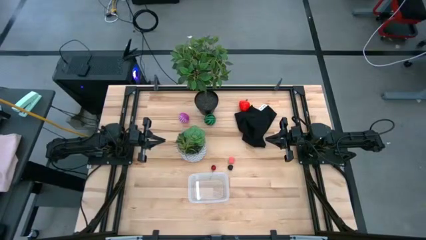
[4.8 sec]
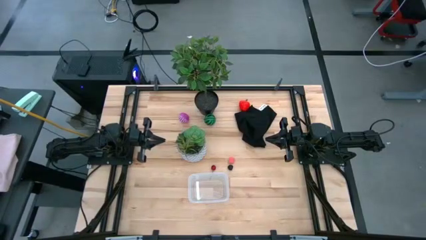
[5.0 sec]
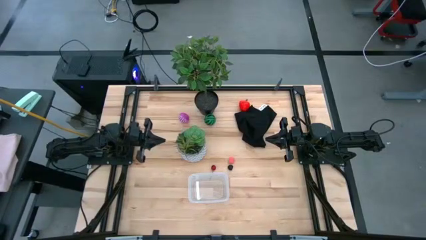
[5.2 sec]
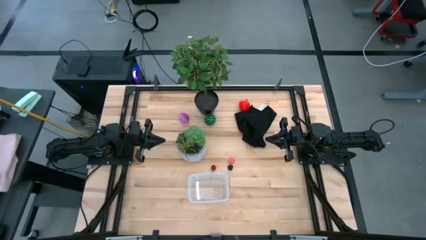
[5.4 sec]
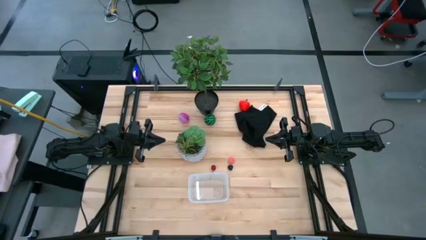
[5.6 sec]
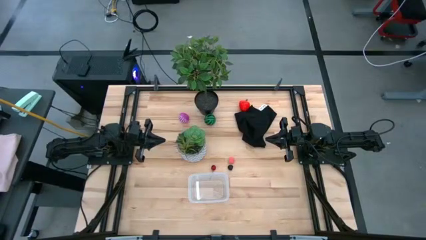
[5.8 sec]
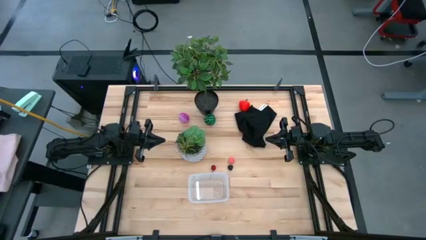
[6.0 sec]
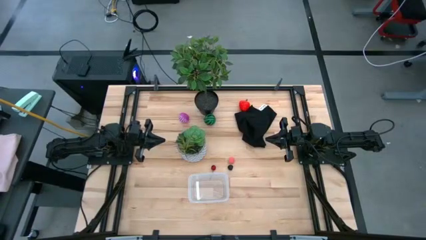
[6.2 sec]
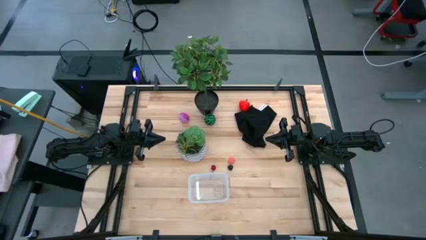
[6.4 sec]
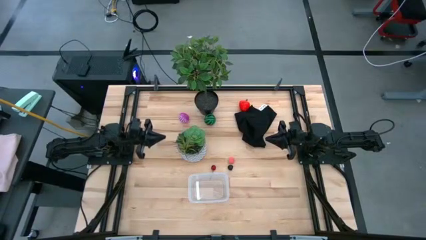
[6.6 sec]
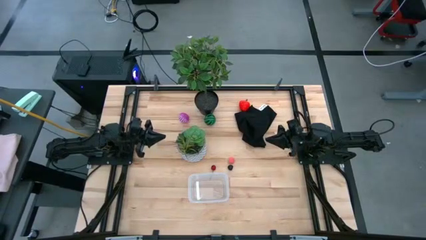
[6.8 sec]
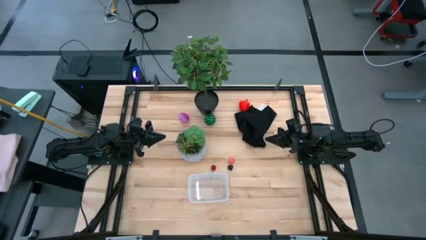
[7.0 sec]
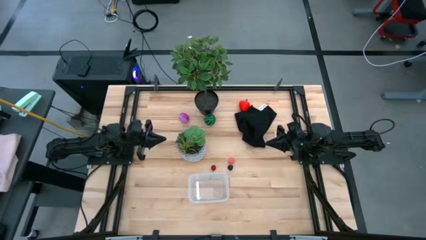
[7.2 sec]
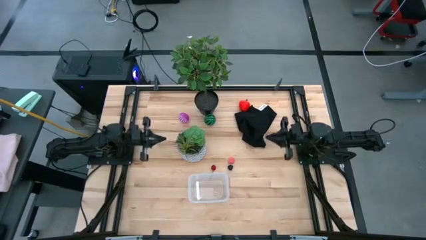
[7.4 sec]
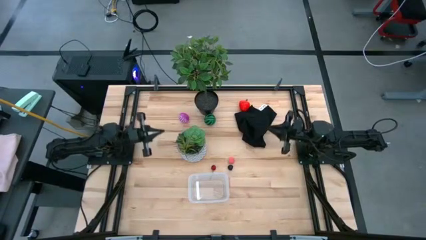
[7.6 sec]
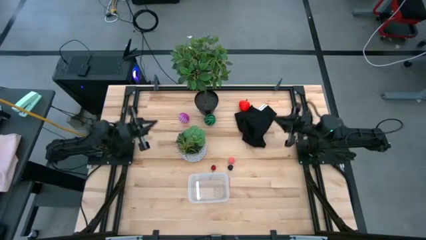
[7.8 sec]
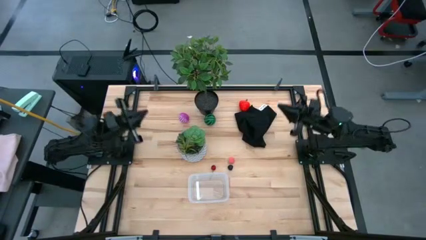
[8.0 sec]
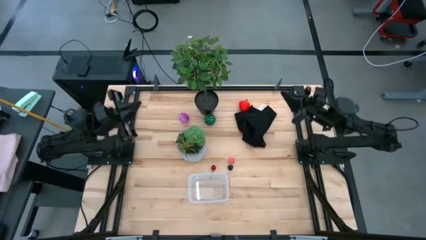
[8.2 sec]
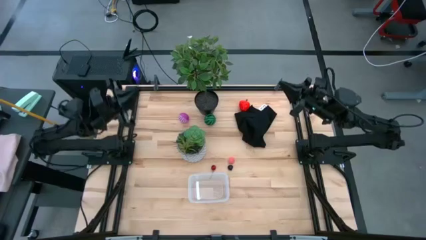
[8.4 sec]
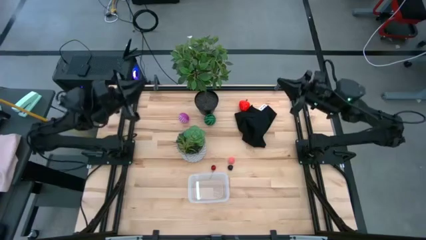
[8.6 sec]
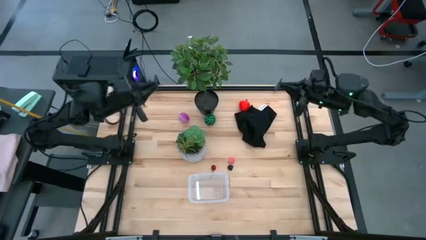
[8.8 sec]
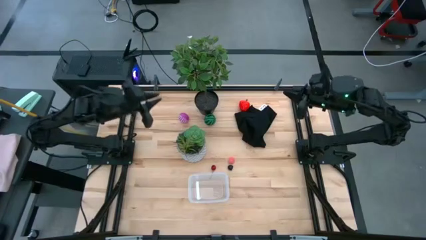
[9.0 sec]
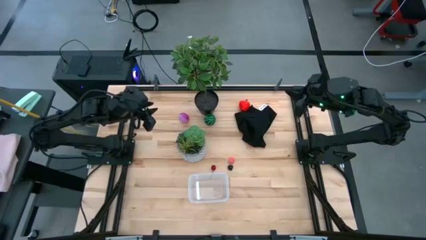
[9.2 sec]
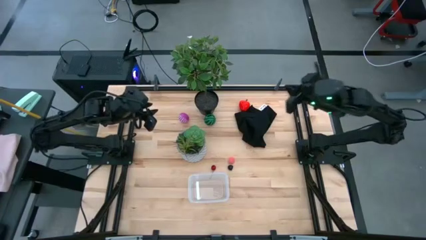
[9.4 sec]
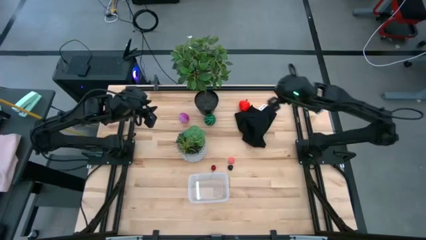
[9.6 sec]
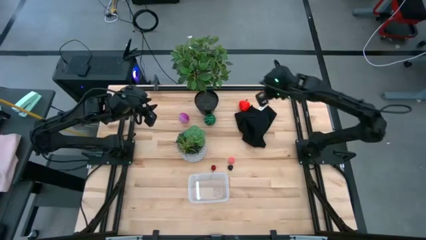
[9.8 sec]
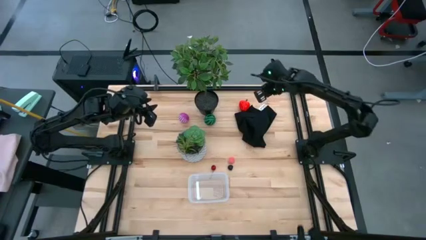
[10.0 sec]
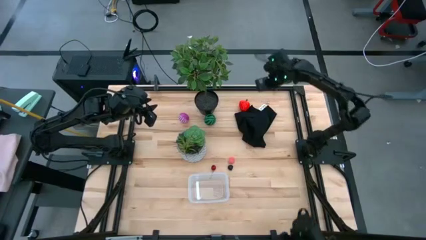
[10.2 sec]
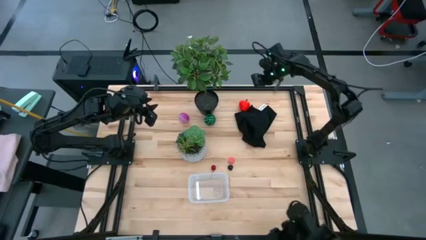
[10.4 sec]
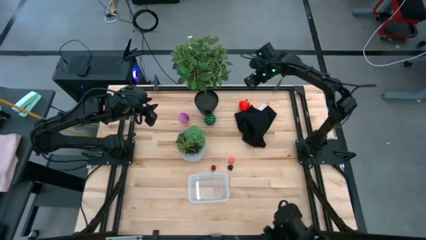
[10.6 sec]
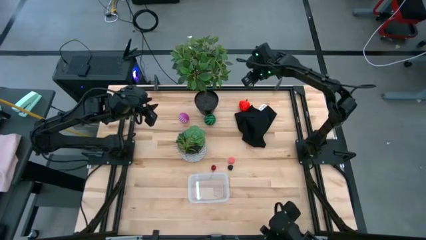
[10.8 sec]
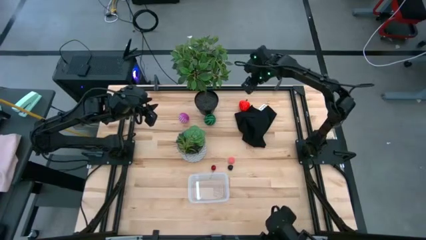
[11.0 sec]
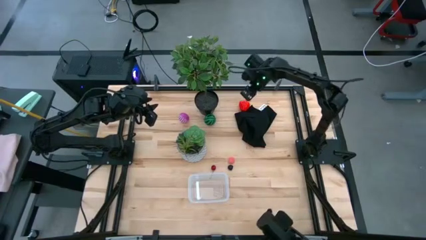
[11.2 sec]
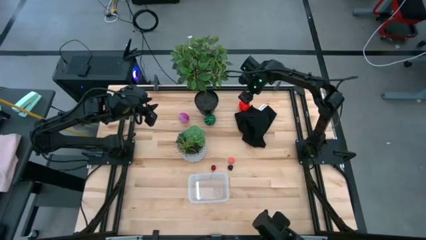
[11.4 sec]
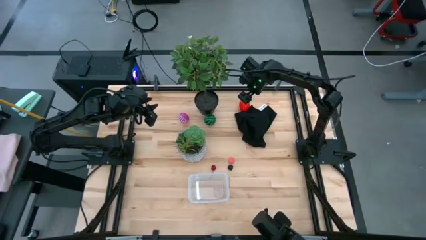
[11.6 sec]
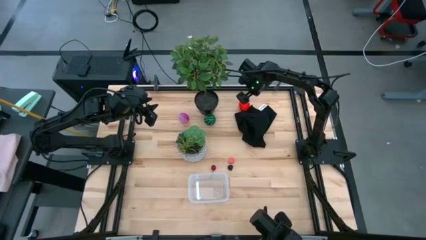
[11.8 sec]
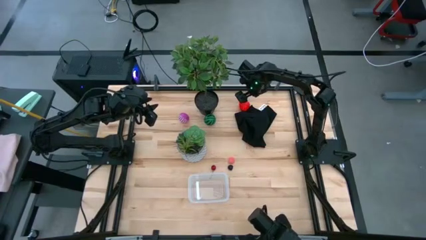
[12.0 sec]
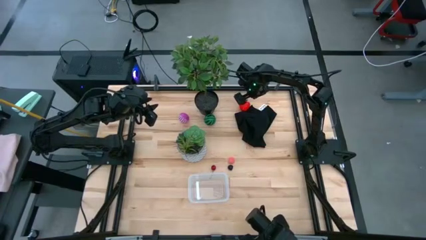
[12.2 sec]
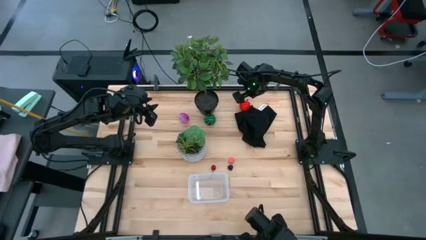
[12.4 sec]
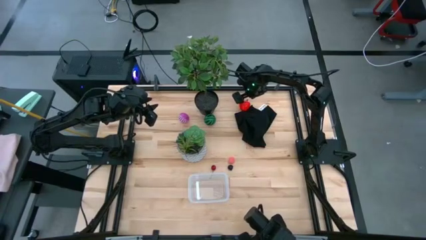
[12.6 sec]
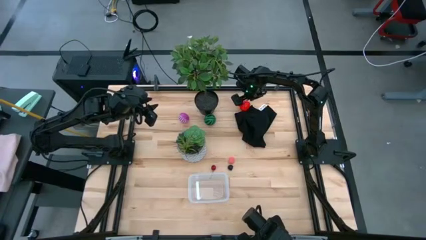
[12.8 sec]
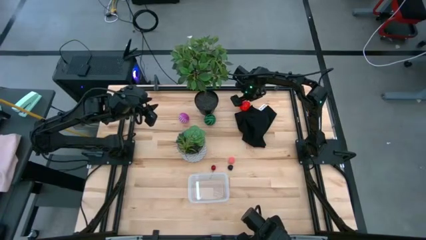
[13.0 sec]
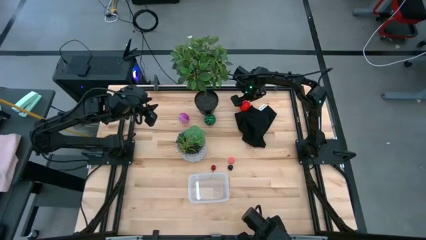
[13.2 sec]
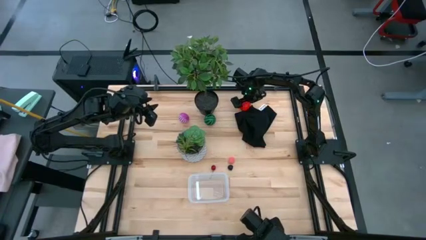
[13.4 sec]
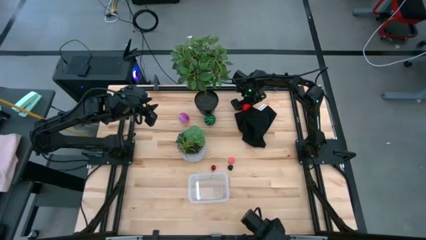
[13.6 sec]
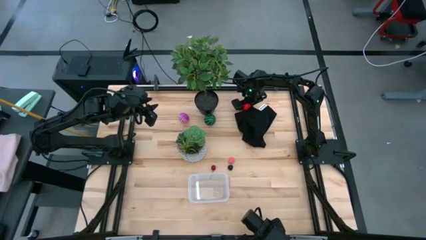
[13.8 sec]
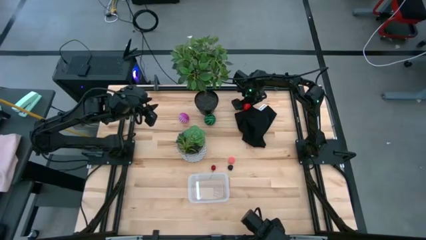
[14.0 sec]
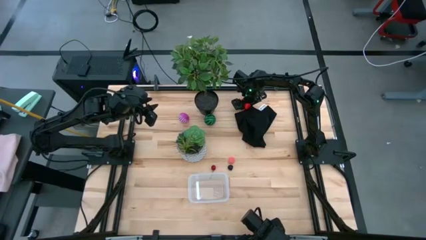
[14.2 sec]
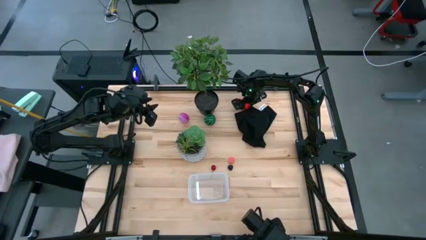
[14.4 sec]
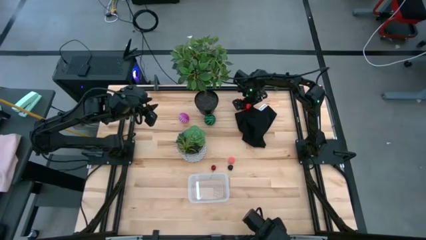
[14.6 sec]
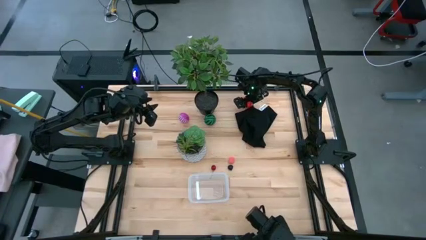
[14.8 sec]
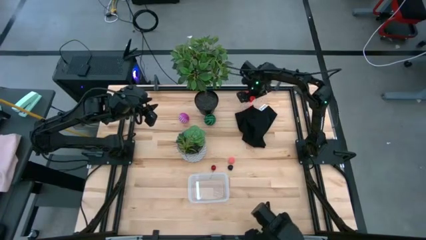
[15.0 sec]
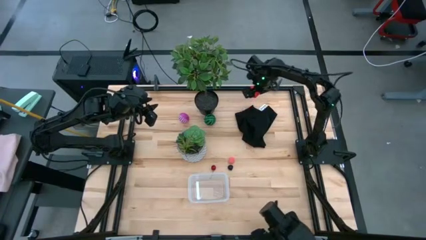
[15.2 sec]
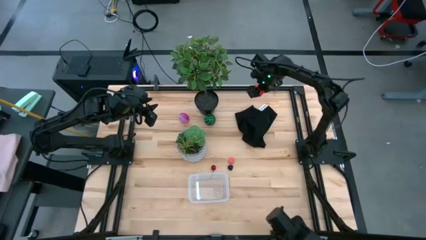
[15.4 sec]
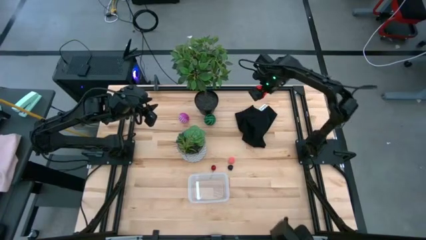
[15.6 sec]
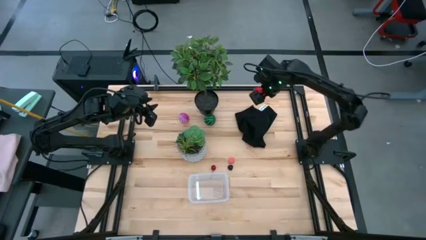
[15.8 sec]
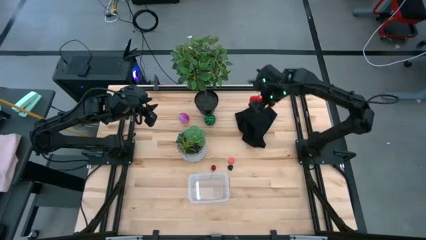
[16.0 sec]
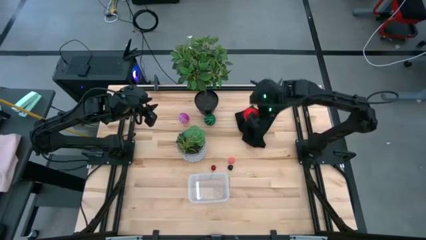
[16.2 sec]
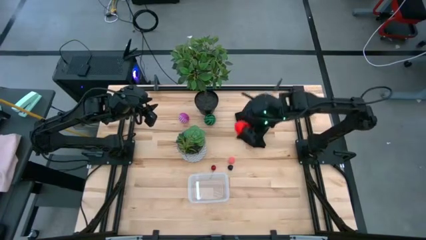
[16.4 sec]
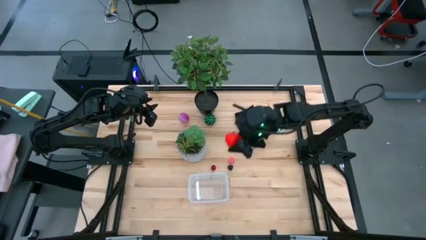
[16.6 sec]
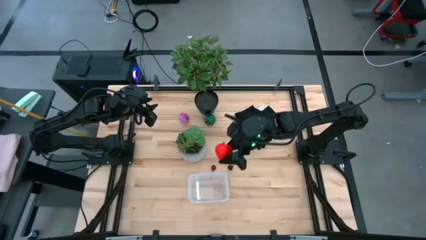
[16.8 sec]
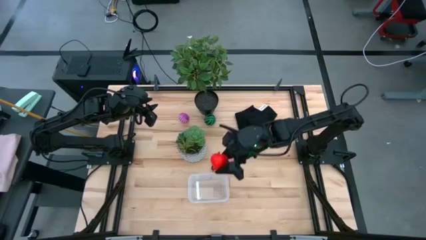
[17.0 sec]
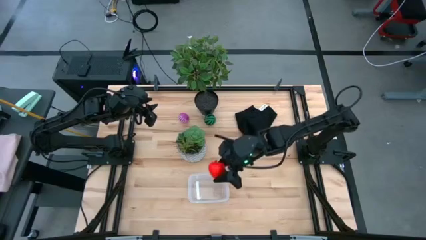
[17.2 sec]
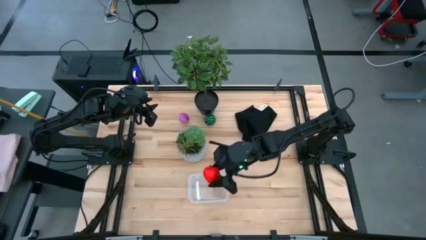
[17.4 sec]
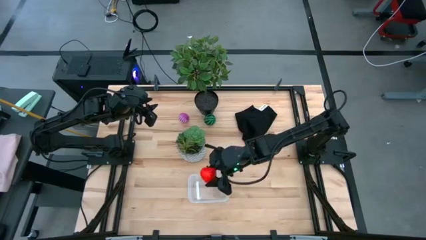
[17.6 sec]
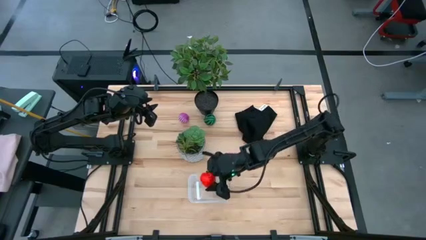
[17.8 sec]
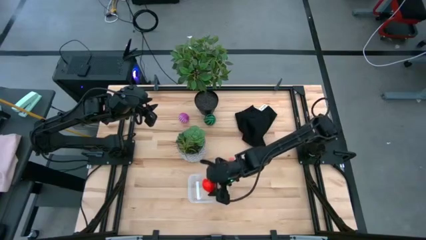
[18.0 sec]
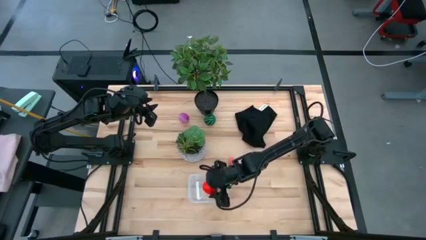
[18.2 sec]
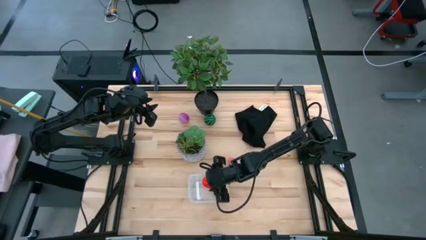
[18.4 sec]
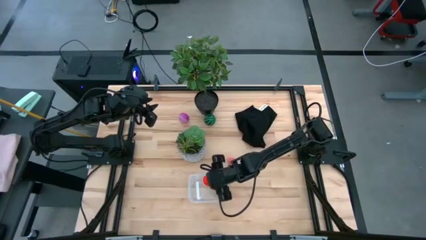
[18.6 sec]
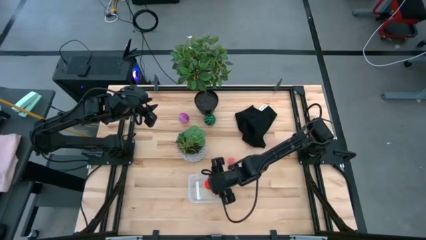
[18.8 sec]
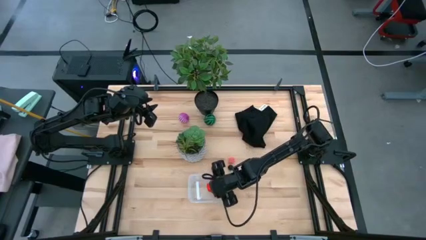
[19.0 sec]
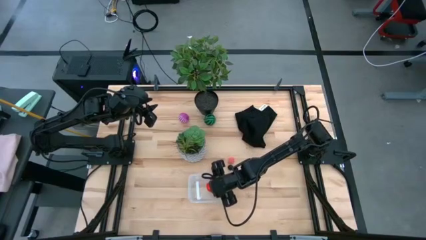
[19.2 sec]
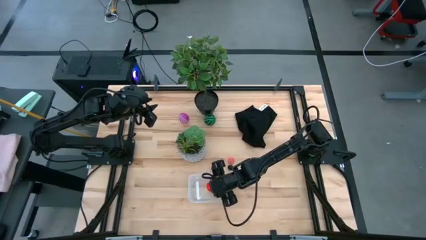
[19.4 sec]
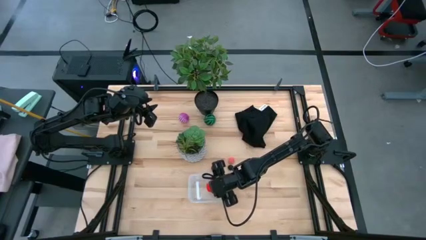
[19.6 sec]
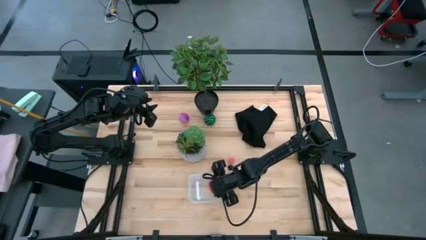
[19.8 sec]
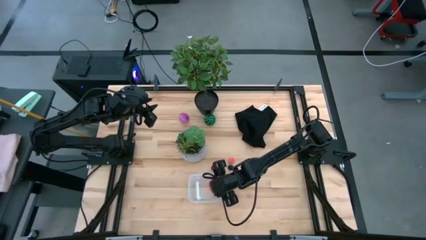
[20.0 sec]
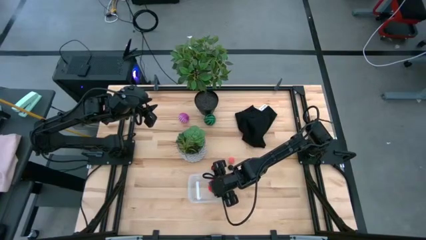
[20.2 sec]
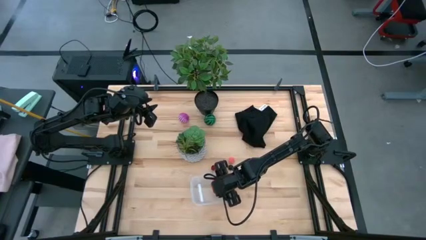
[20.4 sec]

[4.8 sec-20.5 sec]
Task: Pick and placing Produce into tupperware
Put the apple into the transparent bin
